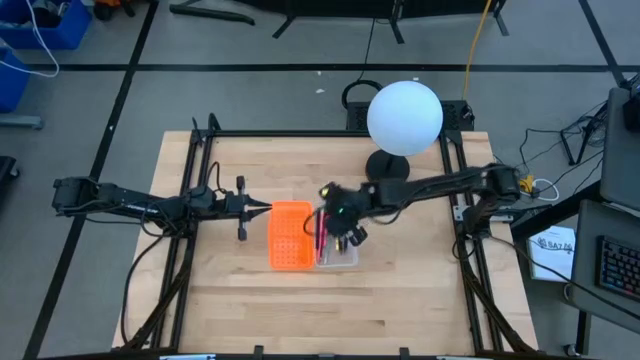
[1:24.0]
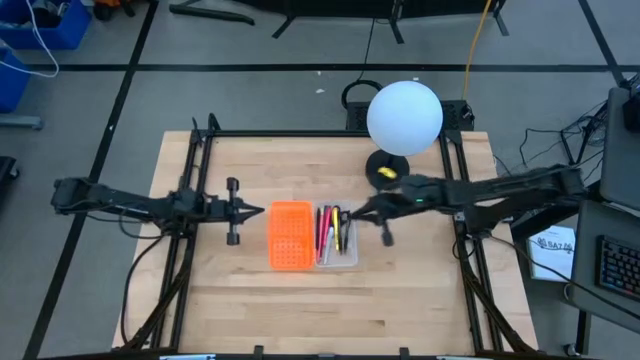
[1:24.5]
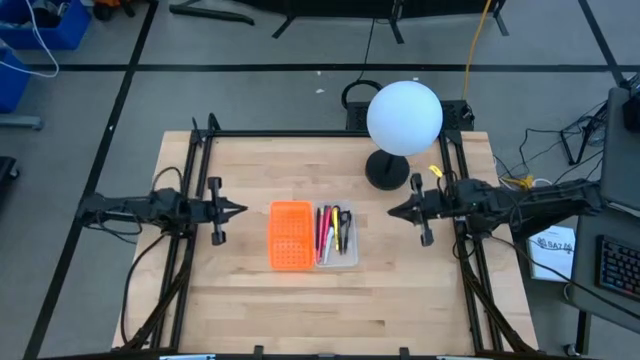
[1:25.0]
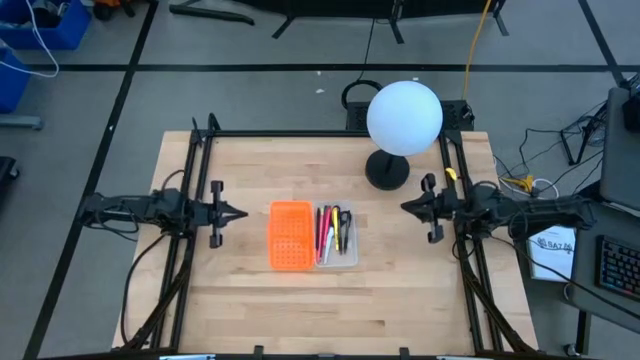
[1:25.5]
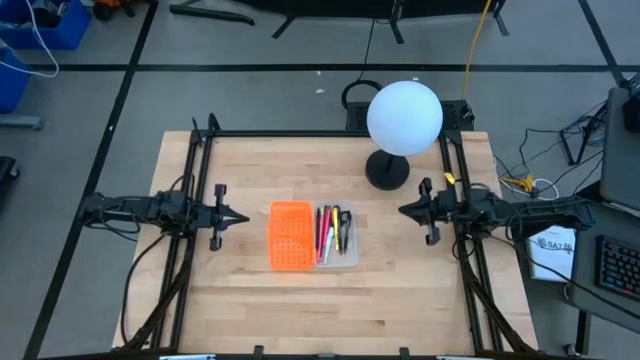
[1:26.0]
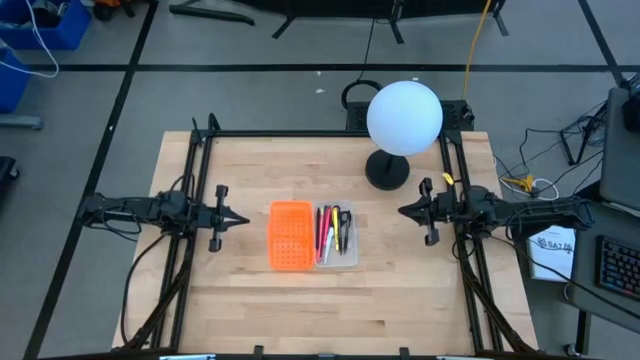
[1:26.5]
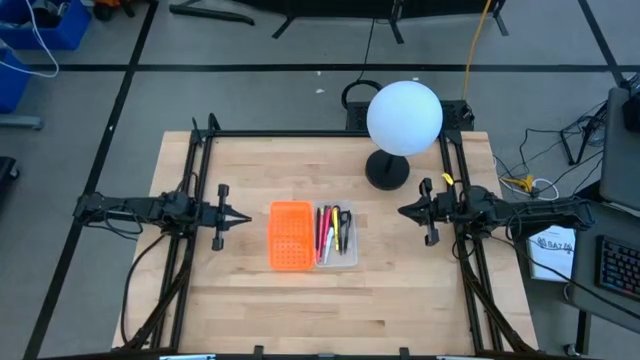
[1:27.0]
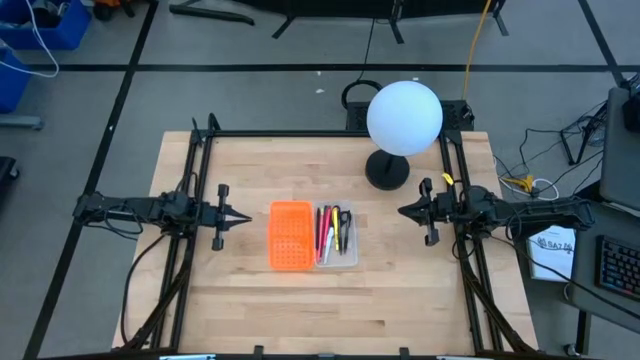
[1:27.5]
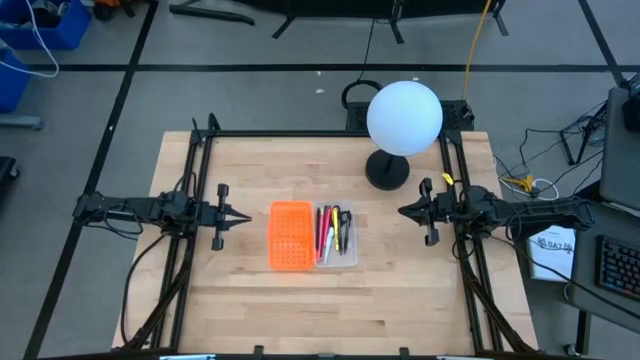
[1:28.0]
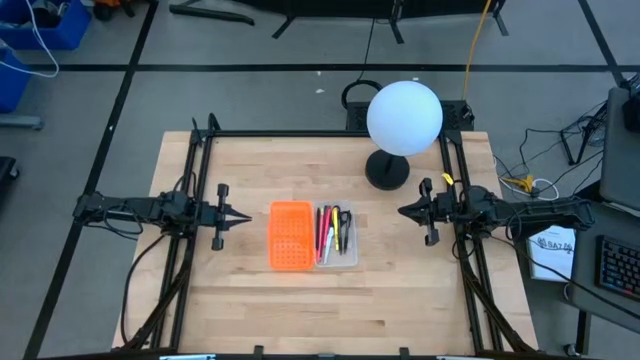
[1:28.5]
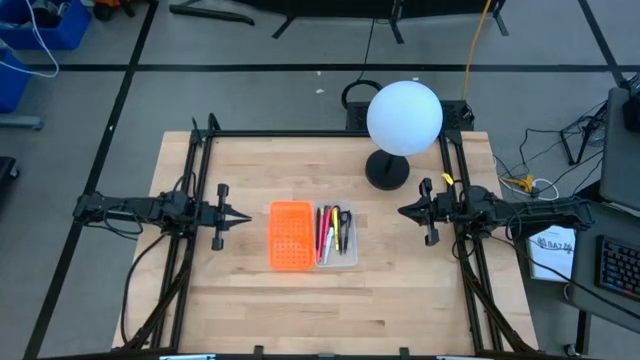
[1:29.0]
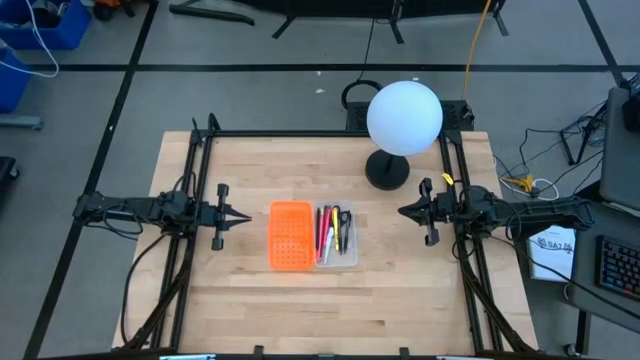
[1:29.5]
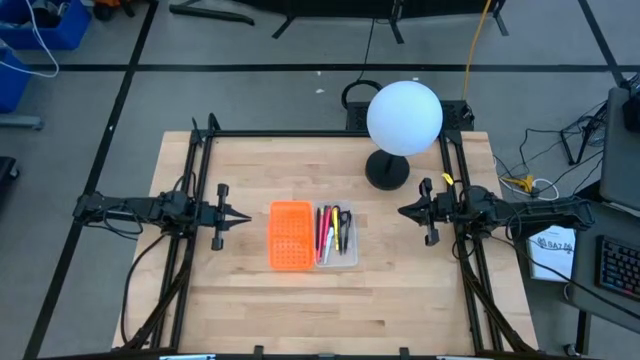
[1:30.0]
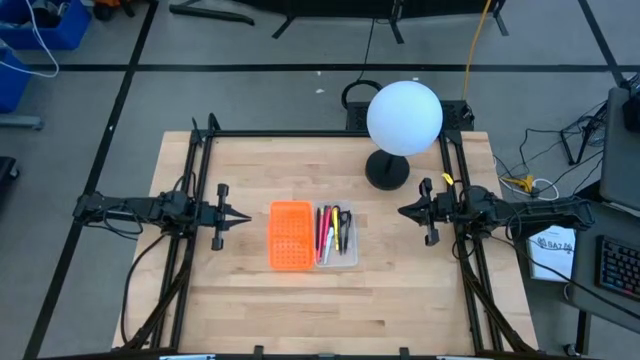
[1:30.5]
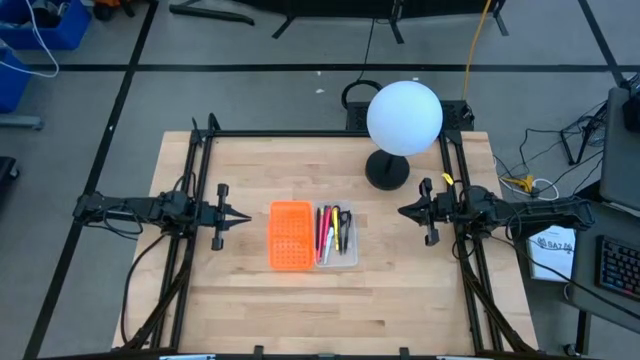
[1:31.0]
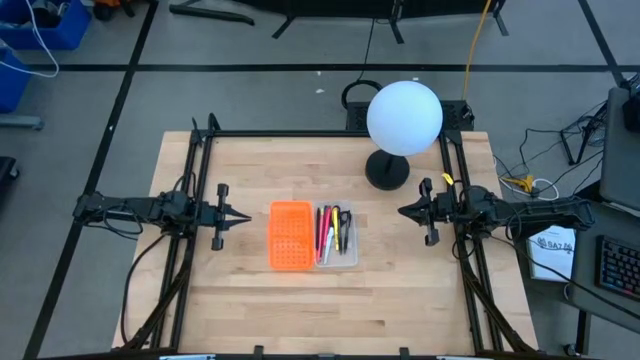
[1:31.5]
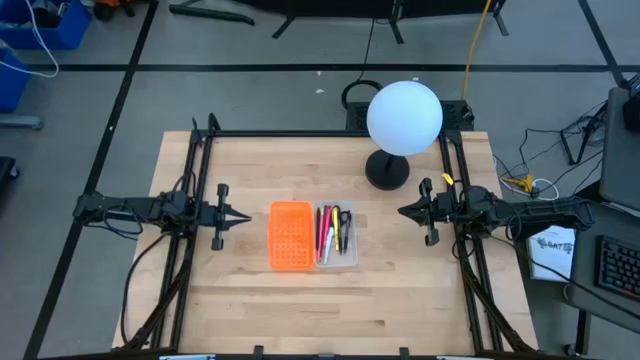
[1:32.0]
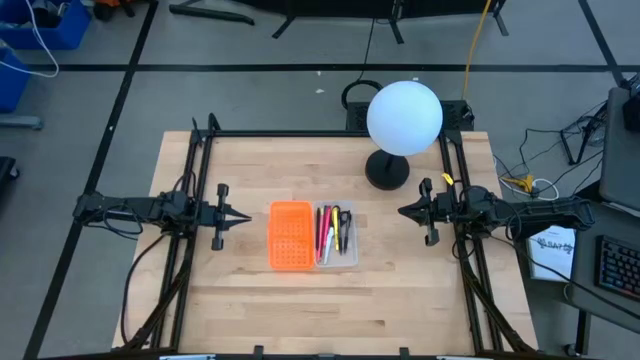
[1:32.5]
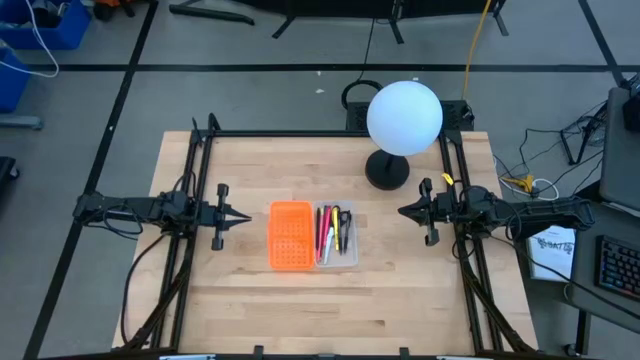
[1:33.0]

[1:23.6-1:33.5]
Task: Pick & place school supplies into a supply box
Return to home position

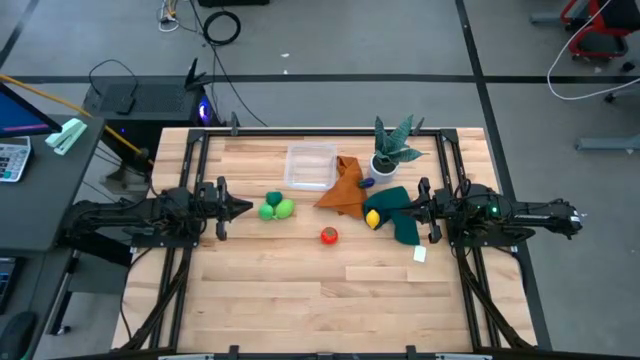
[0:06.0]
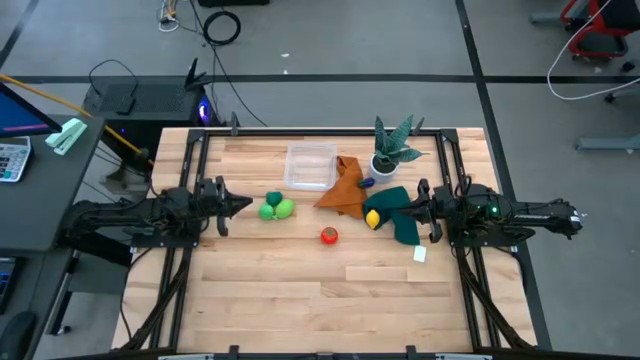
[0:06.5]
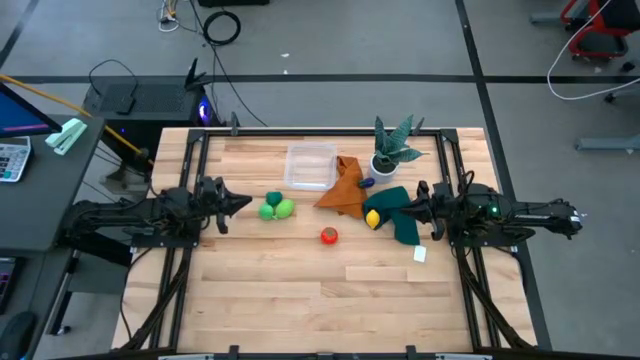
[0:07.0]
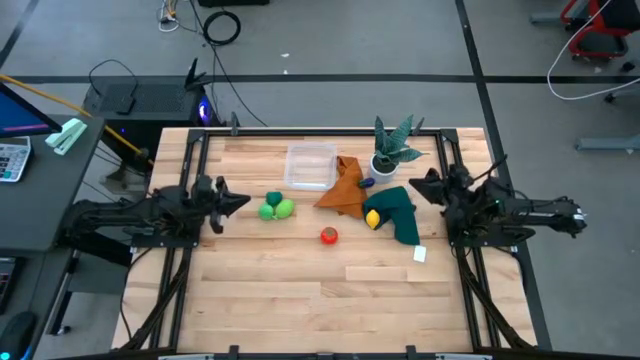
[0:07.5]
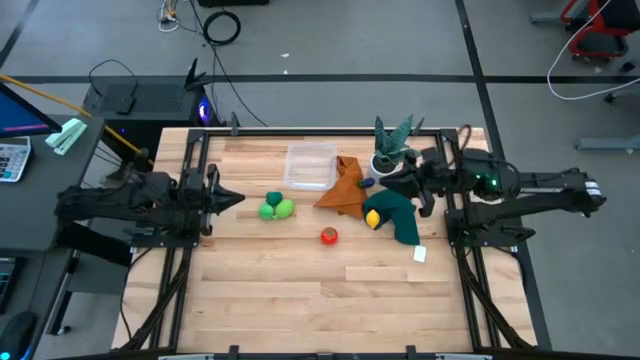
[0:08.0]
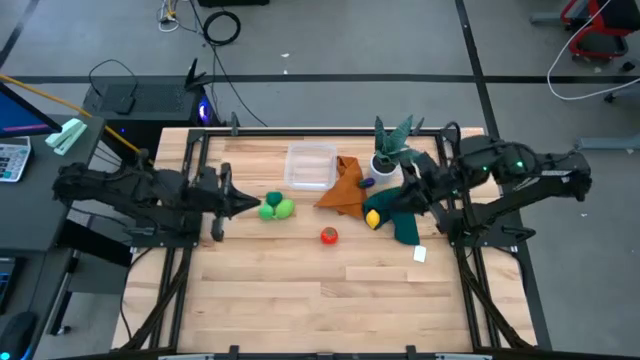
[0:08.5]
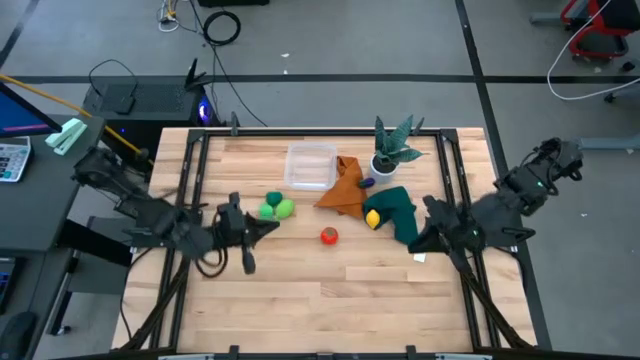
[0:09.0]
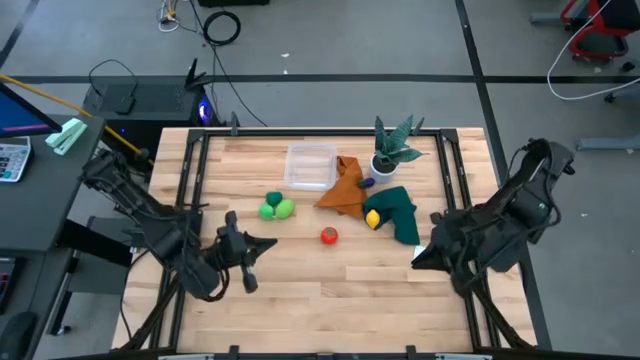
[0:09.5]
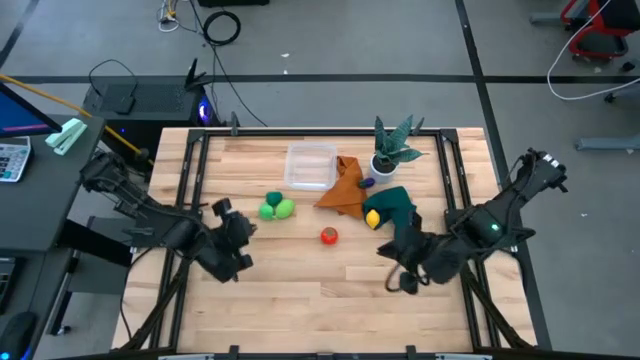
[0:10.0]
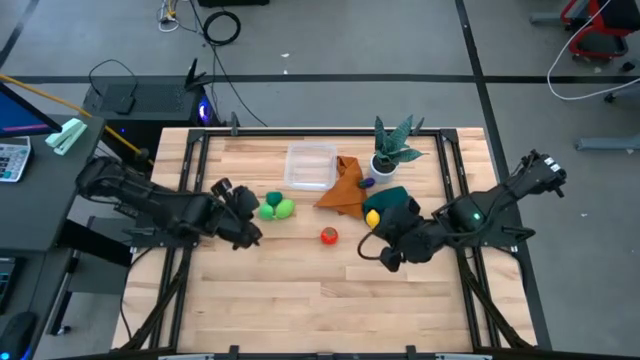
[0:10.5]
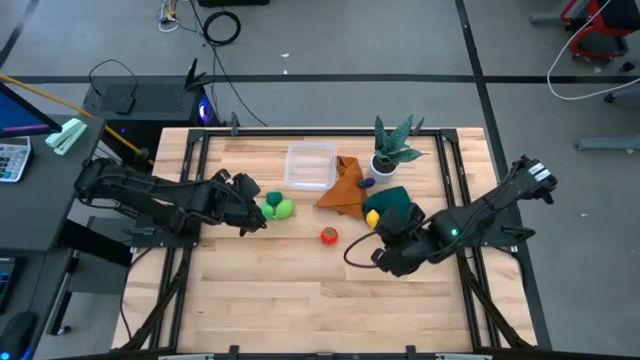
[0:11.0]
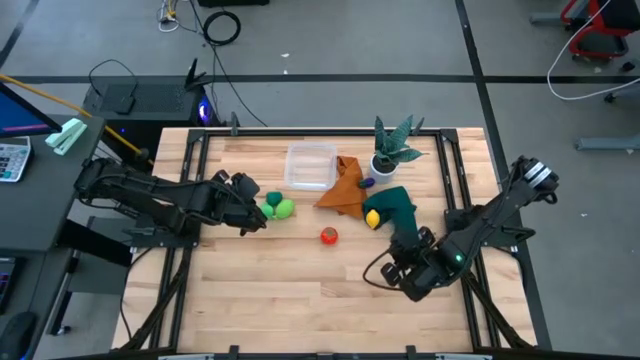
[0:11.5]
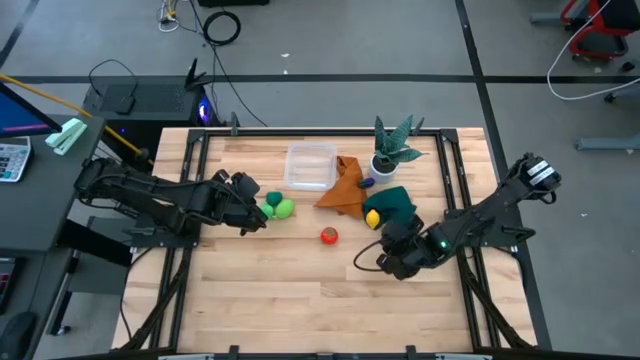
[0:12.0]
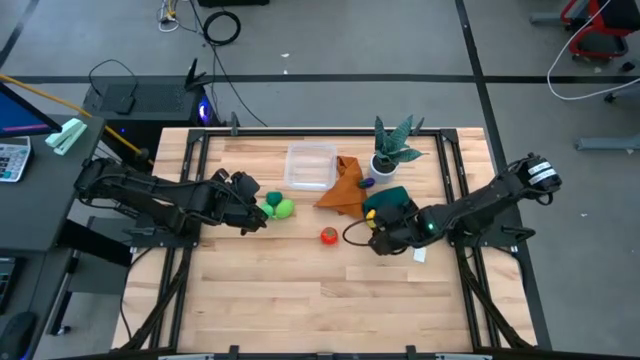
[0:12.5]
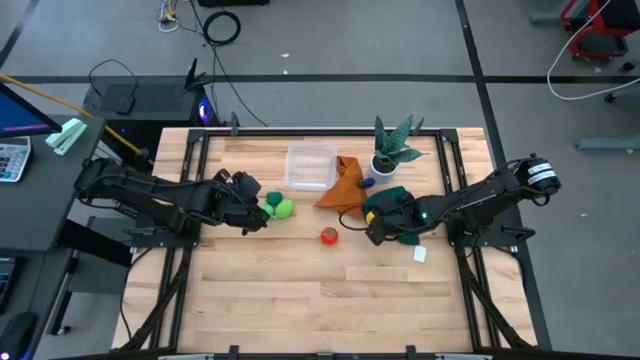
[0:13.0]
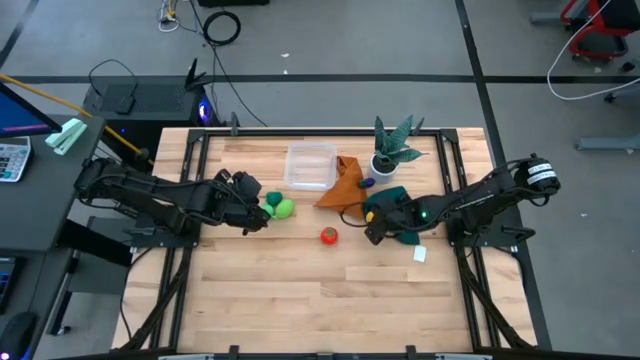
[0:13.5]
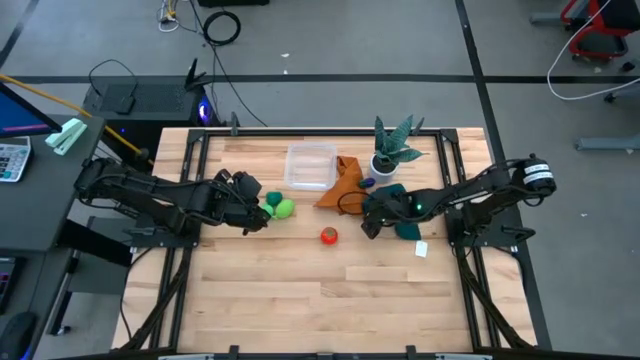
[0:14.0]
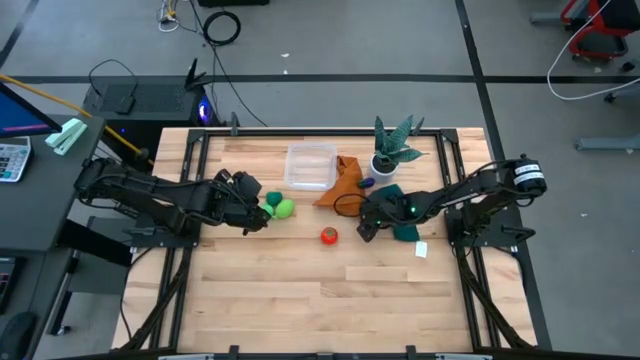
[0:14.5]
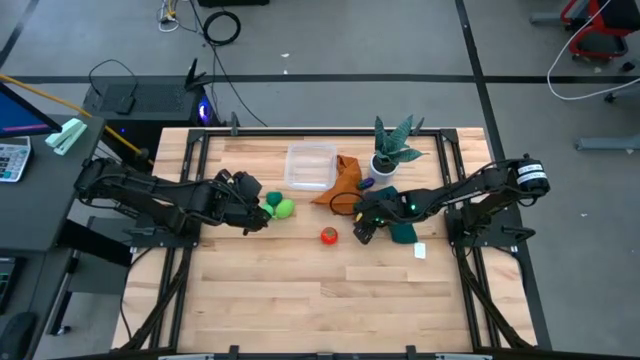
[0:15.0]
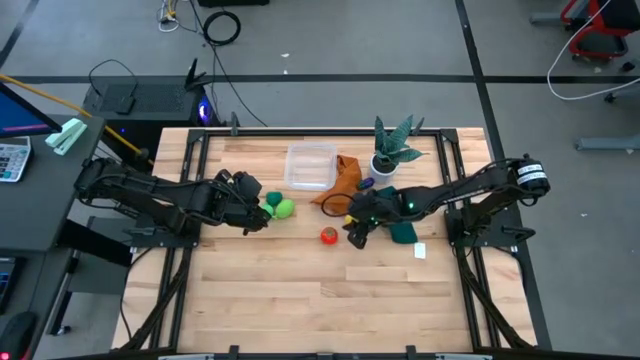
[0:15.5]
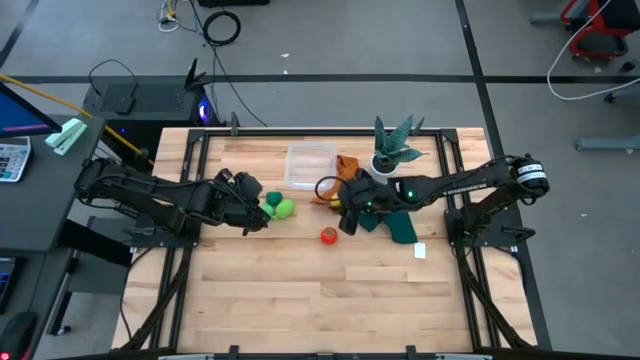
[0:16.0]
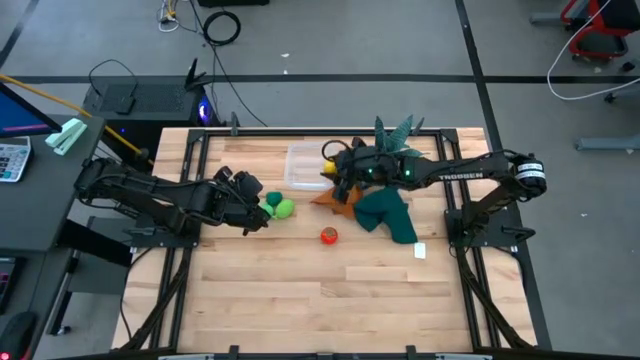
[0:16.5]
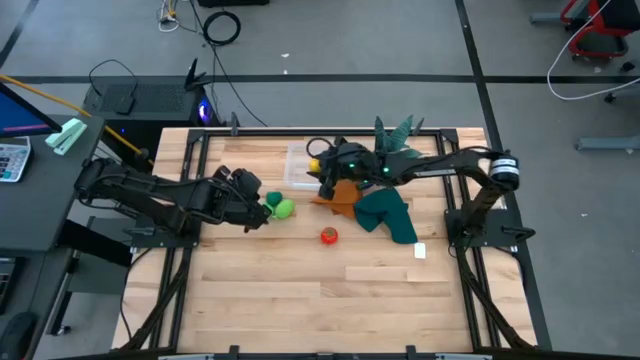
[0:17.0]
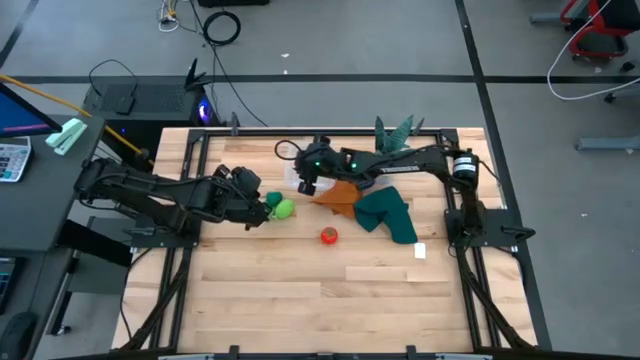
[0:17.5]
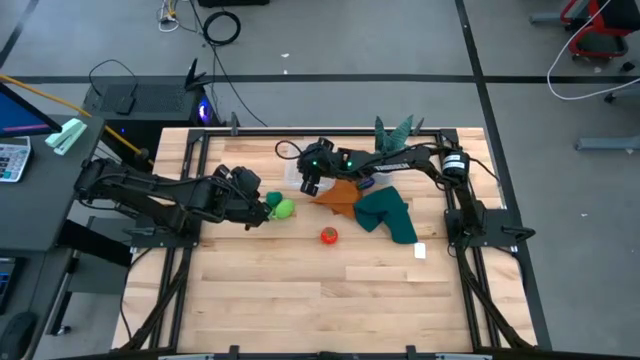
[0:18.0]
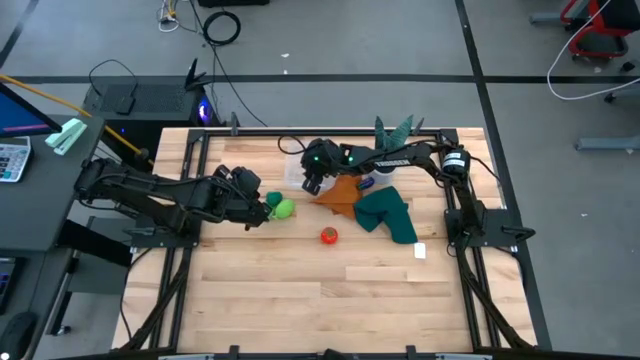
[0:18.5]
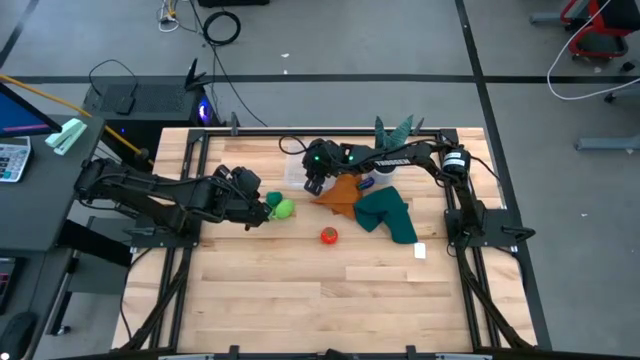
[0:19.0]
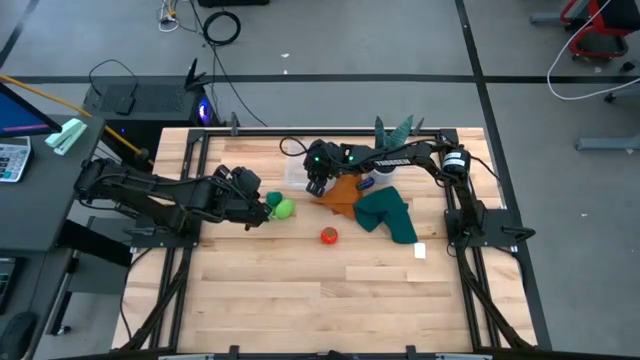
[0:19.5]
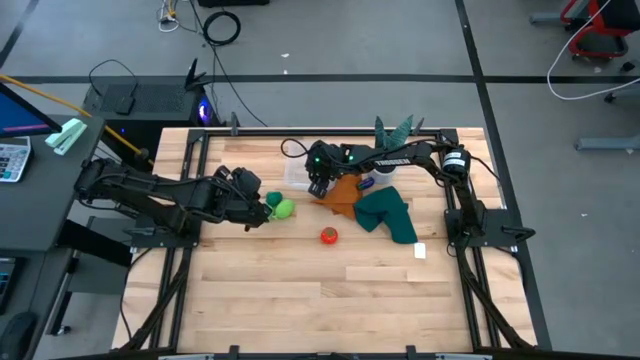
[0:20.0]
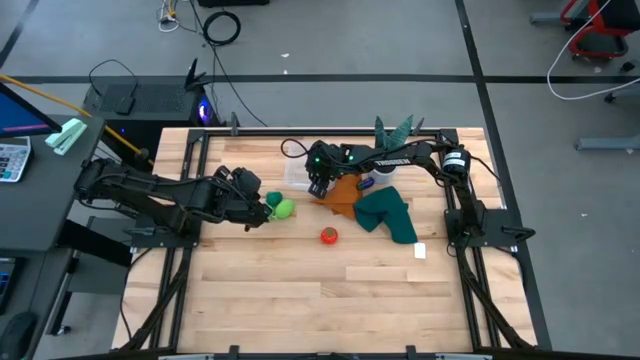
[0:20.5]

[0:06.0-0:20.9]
Task: Pick and placing Produce into tupperware
Put the yellow lemon into the transparent container
